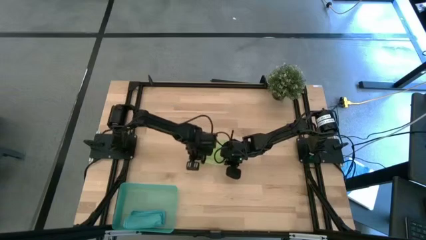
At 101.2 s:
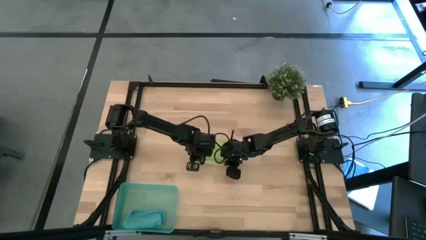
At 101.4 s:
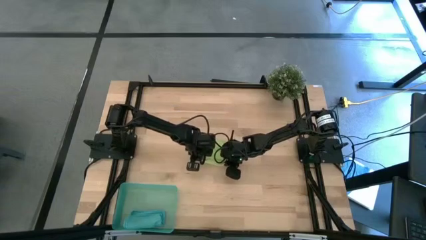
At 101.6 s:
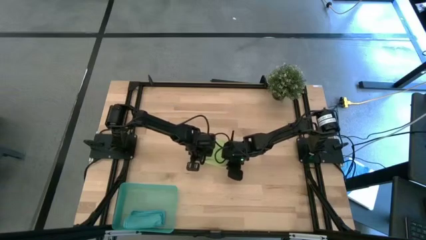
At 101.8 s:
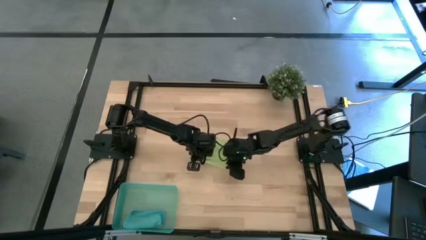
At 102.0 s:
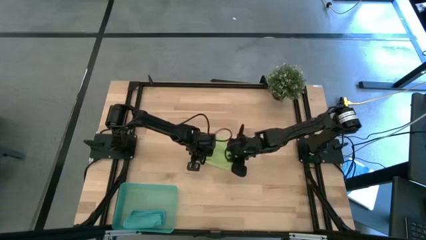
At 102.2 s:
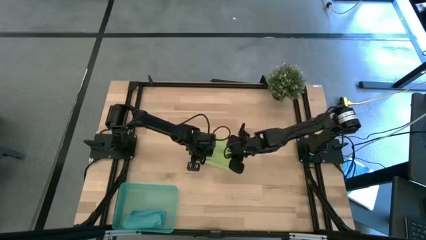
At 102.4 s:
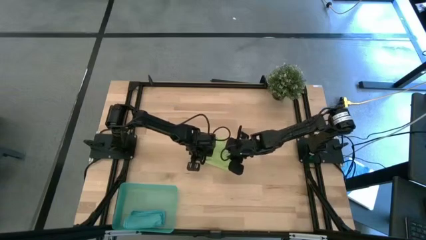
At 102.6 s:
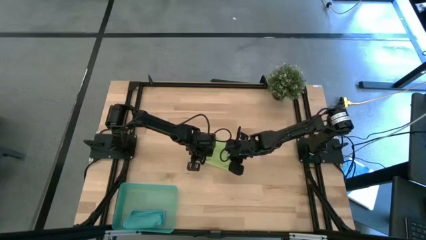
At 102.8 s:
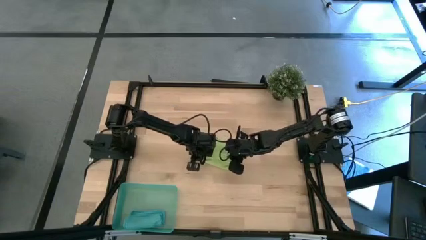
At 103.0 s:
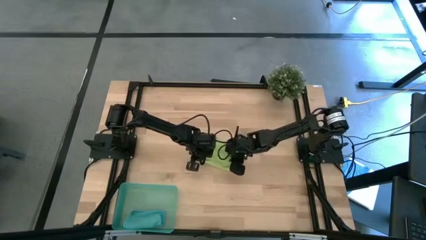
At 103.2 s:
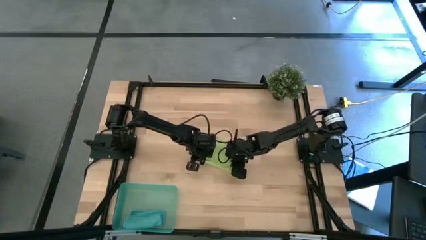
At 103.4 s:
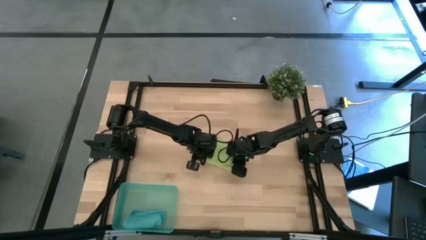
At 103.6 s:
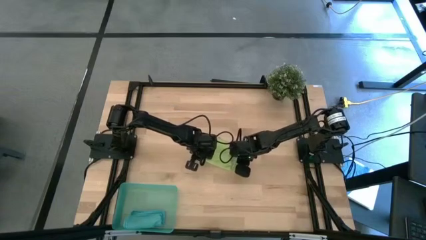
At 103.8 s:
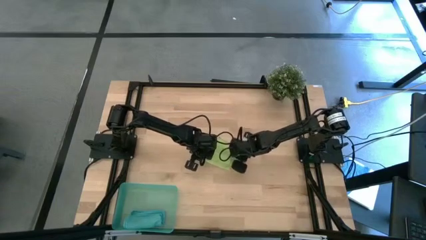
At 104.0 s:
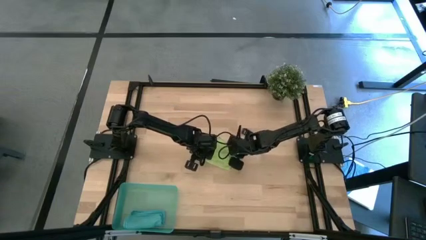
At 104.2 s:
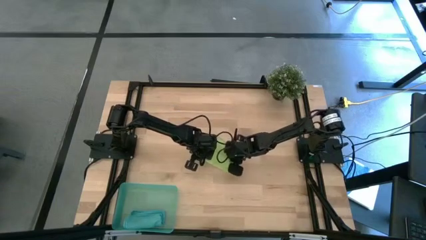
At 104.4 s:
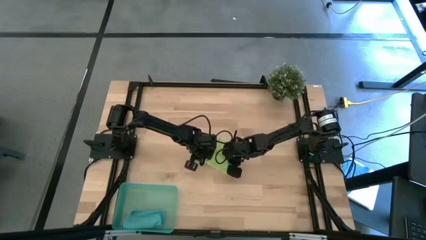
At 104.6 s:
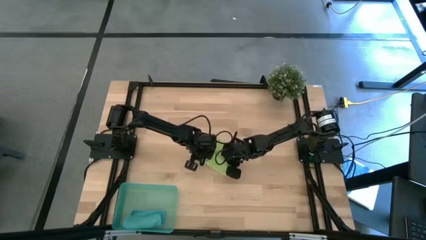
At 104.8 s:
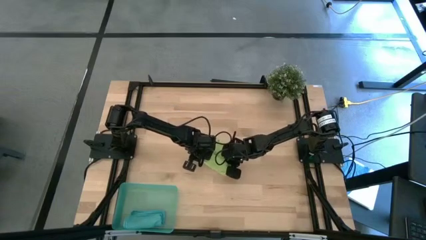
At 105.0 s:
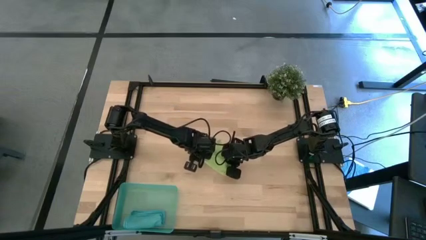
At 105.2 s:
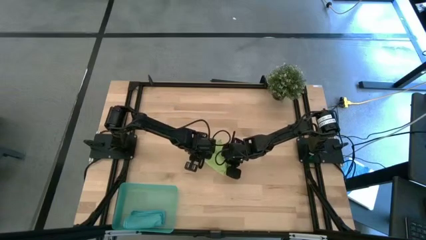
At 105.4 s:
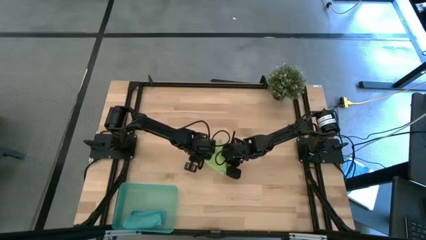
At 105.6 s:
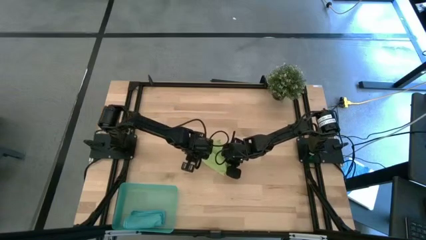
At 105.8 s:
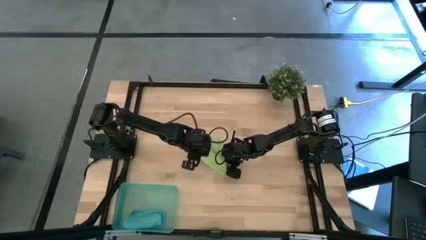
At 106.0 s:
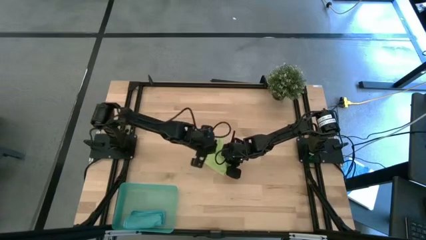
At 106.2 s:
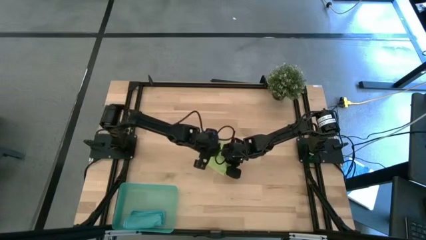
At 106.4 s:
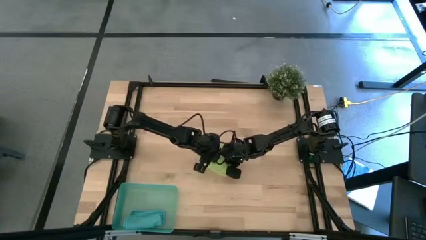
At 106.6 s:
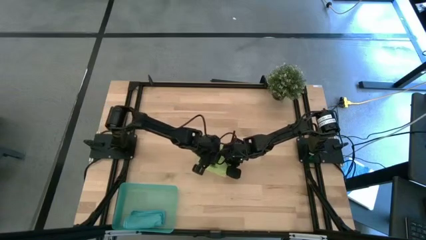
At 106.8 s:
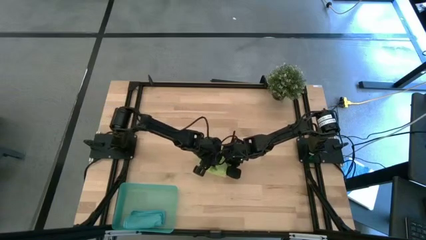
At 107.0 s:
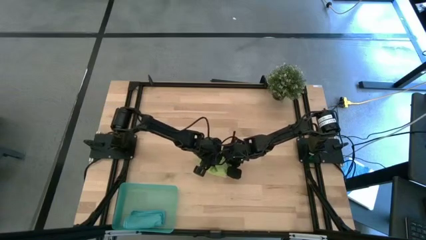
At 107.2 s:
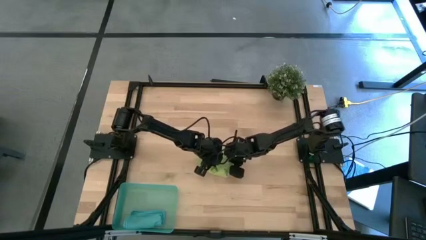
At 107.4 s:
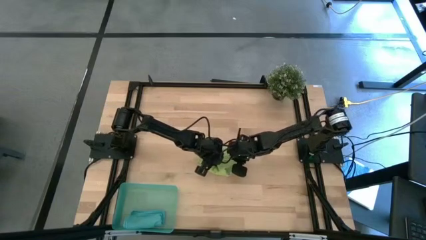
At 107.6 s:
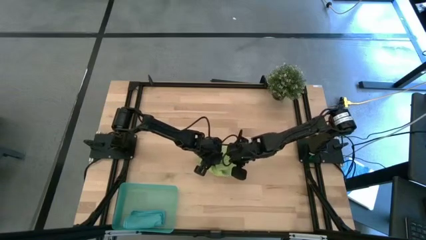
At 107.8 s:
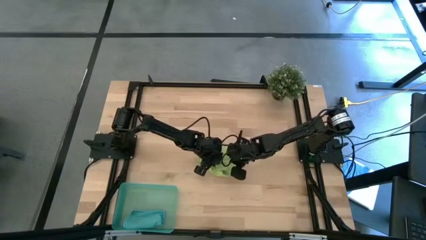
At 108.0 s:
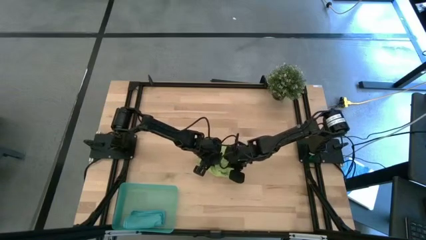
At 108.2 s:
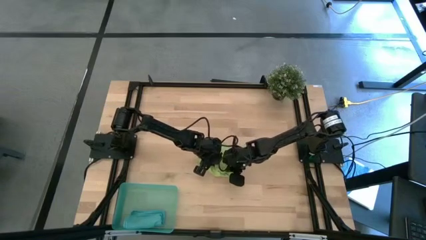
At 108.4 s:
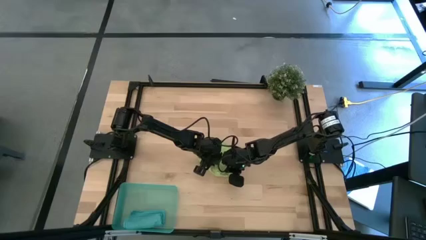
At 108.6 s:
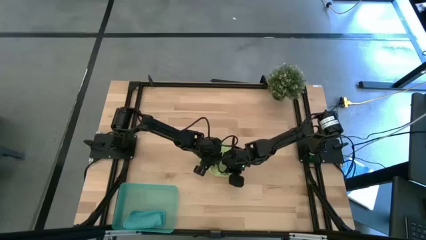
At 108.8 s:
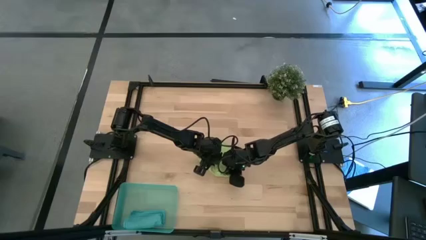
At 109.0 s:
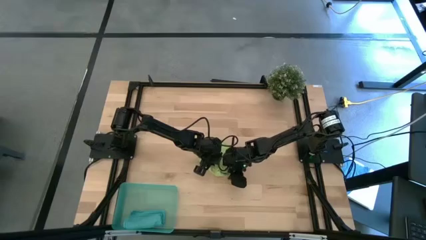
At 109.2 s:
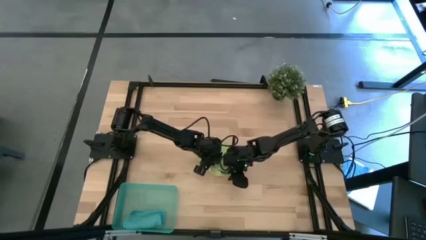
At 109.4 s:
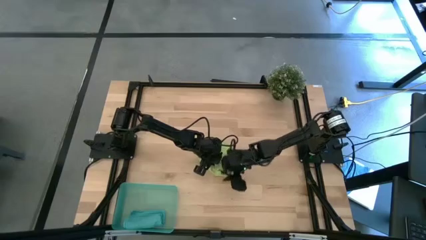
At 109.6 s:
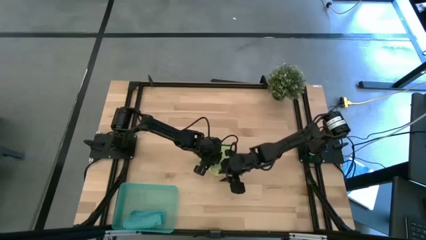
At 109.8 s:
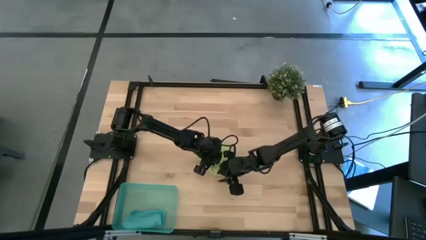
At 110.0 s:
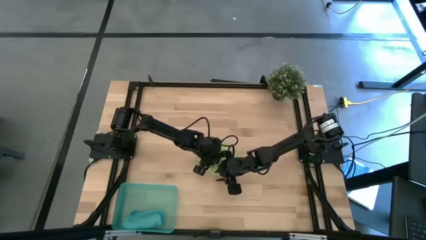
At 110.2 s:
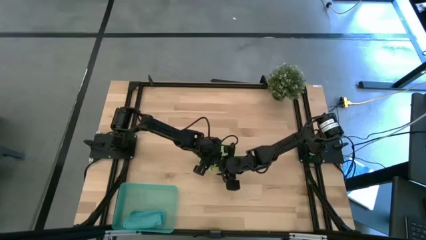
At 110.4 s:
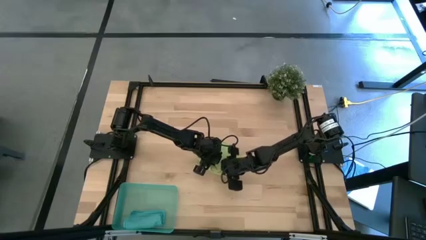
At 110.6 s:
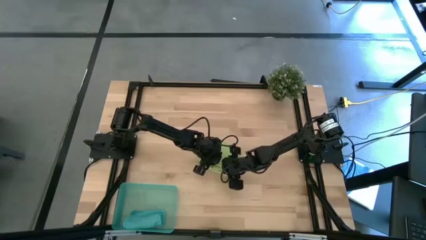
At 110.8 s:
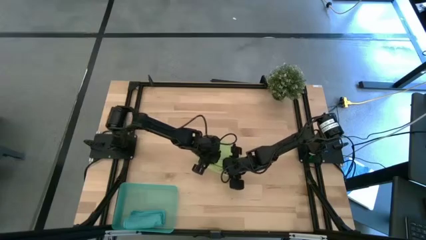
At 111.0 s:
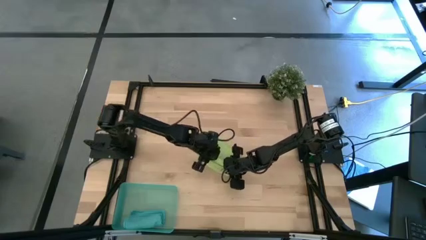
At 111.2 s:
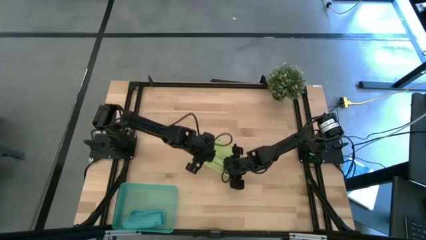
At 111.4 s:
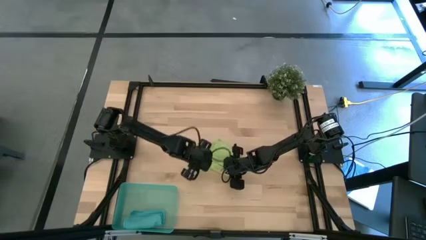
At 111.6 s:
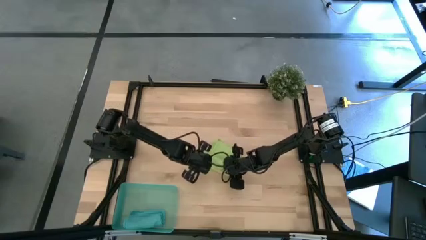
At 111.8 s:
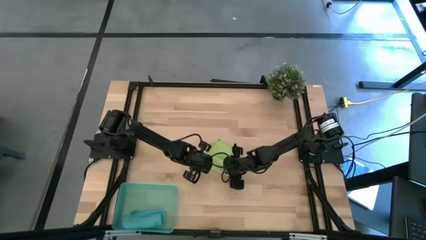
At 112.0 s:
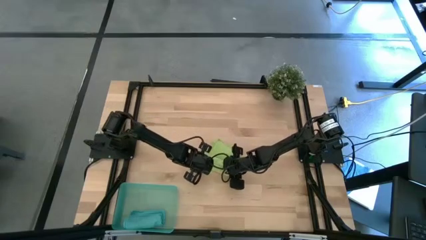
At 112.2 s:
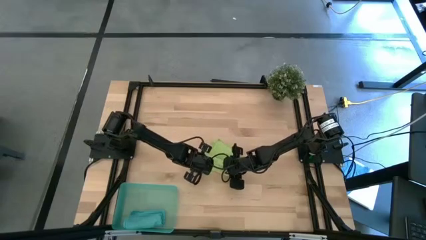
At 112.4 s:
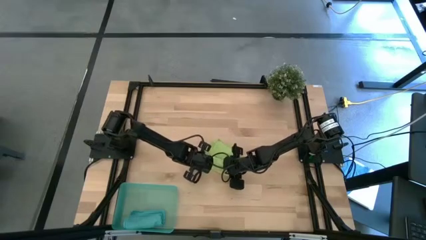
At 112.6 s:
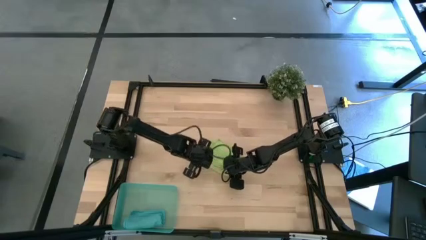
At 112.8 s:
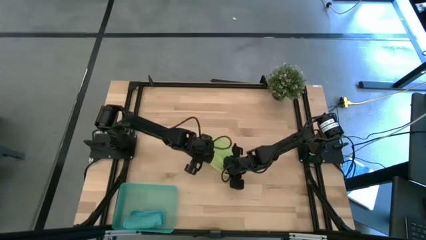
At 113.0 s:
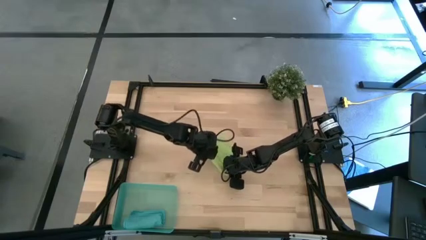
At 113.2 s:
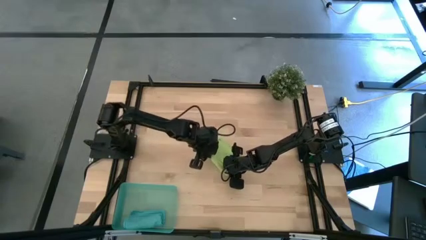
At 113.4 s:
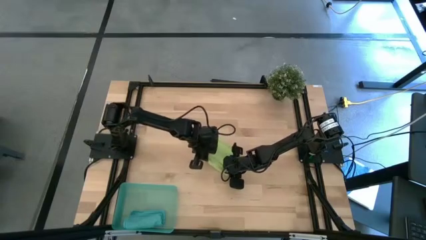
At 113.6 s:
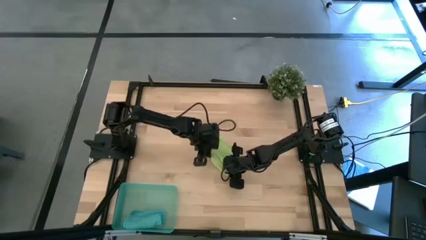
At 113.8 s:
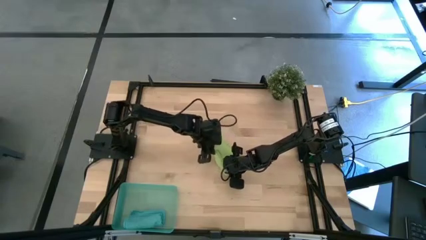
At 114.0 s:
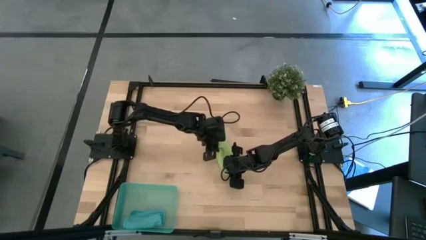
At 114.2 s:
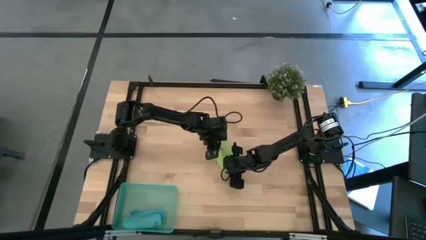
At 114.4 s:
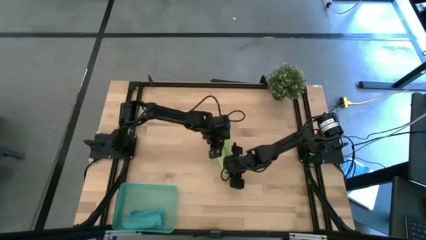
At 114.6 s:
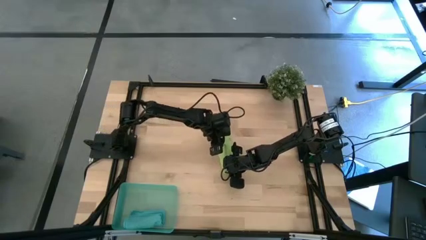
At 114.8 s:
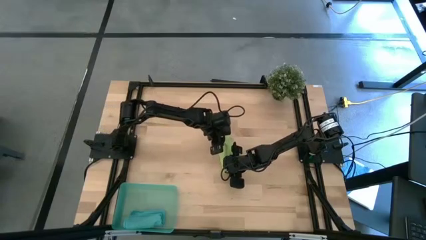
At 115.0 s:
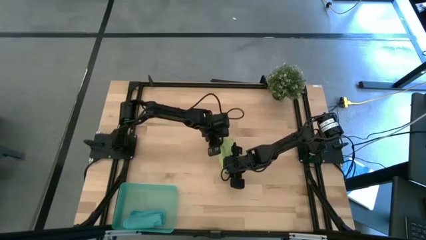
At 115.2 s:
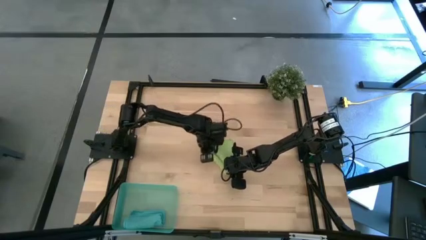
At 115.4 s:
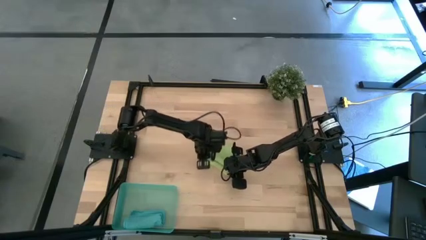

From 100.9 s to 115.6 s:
Task: Roll microfiber towels into tight, uniform cylinder then place into a basket
Roll the yellow green microfiber towel
